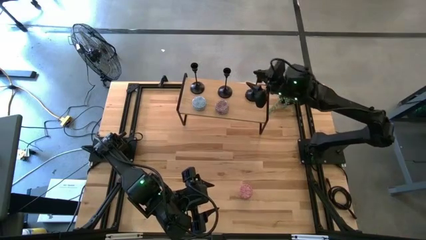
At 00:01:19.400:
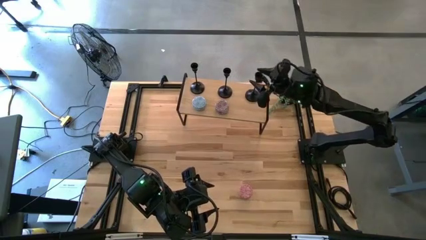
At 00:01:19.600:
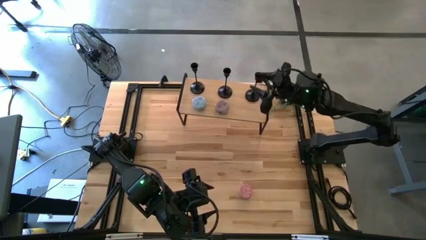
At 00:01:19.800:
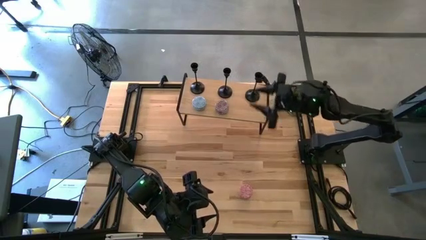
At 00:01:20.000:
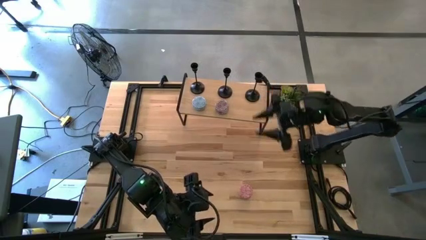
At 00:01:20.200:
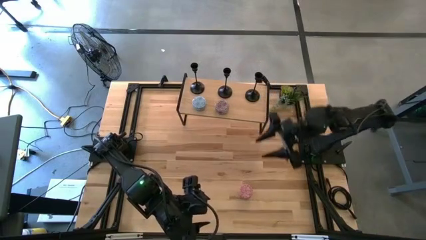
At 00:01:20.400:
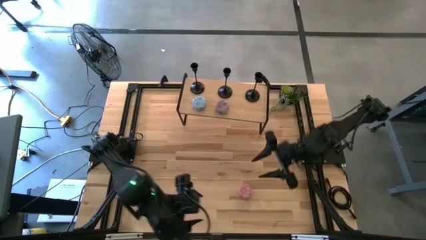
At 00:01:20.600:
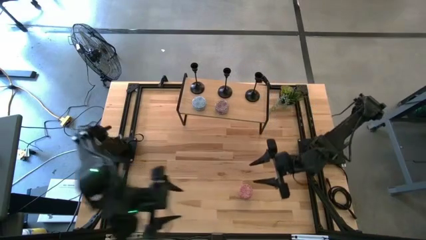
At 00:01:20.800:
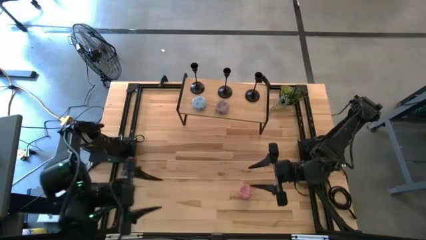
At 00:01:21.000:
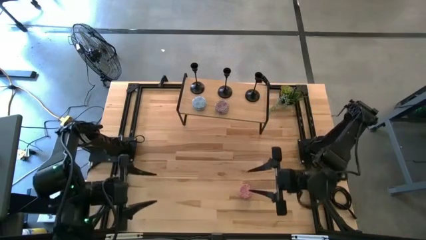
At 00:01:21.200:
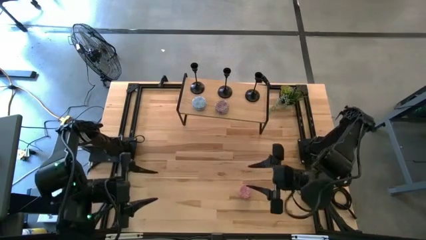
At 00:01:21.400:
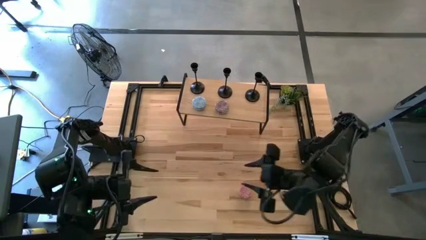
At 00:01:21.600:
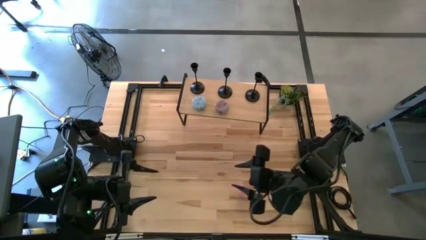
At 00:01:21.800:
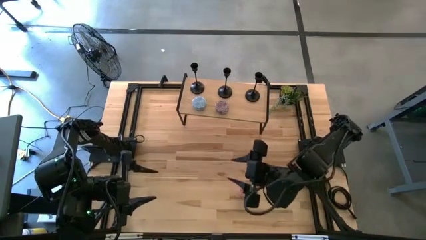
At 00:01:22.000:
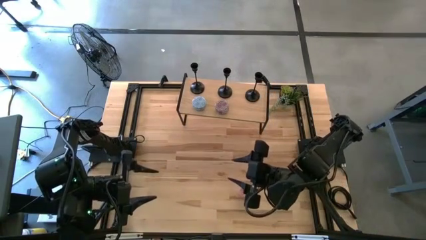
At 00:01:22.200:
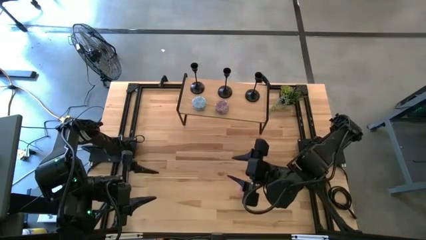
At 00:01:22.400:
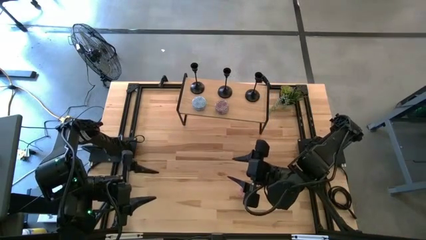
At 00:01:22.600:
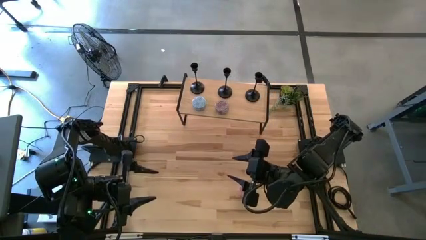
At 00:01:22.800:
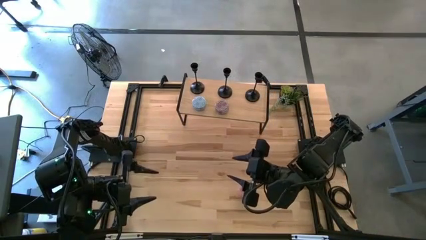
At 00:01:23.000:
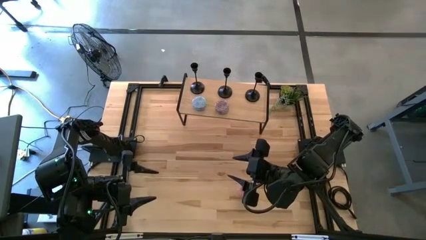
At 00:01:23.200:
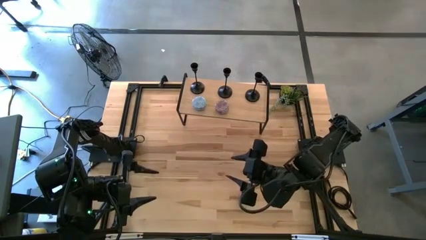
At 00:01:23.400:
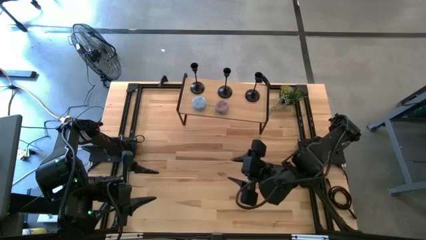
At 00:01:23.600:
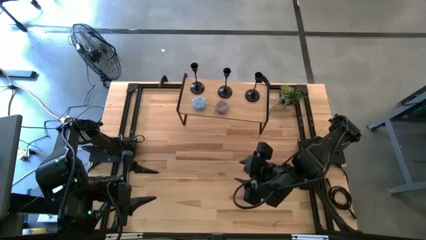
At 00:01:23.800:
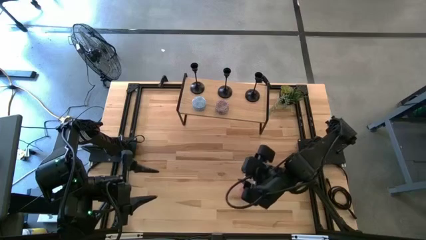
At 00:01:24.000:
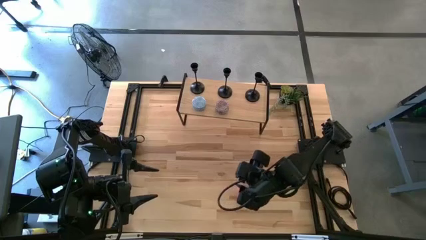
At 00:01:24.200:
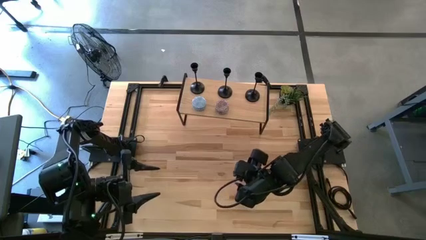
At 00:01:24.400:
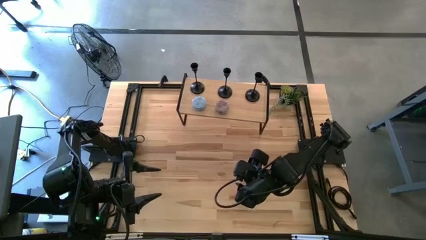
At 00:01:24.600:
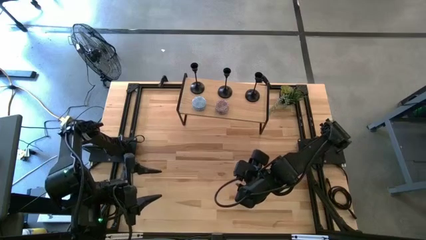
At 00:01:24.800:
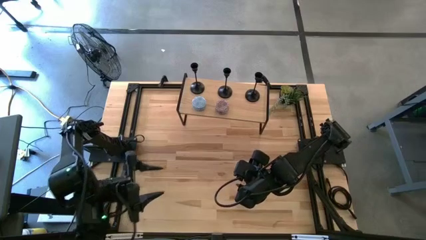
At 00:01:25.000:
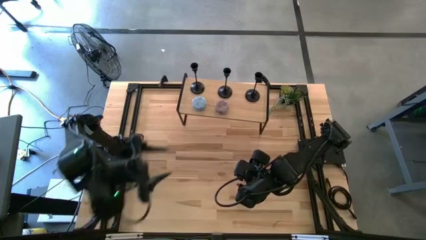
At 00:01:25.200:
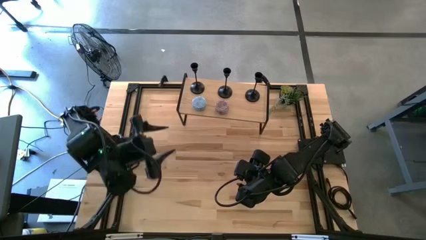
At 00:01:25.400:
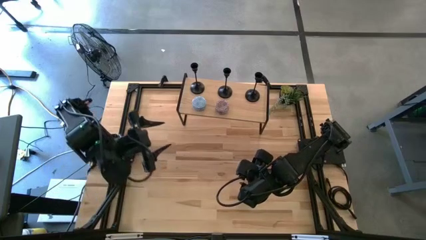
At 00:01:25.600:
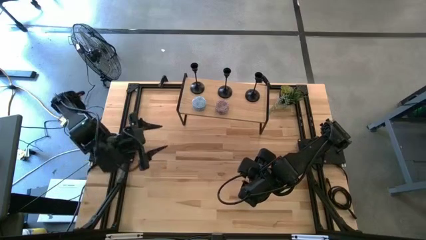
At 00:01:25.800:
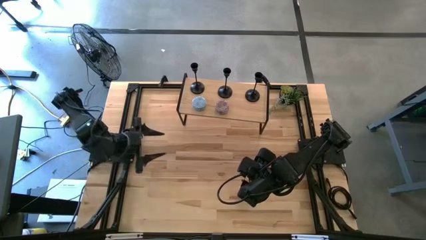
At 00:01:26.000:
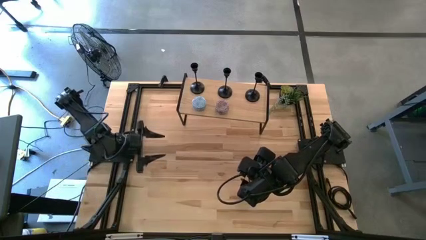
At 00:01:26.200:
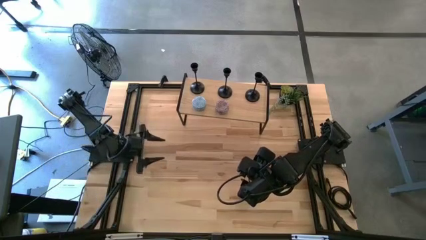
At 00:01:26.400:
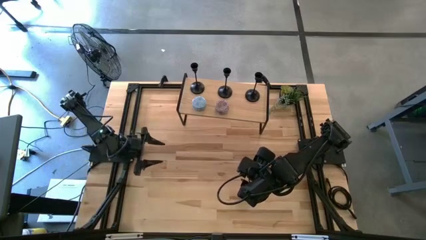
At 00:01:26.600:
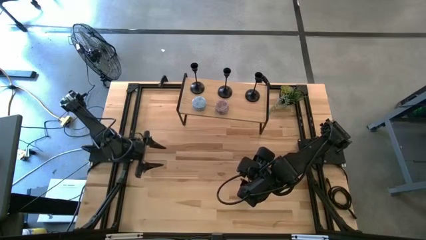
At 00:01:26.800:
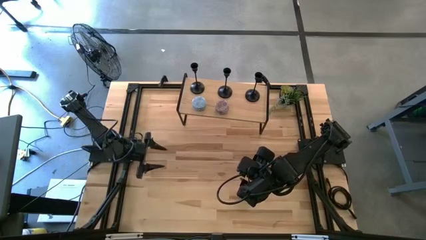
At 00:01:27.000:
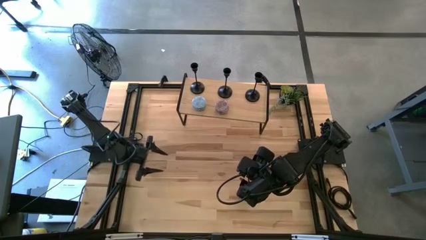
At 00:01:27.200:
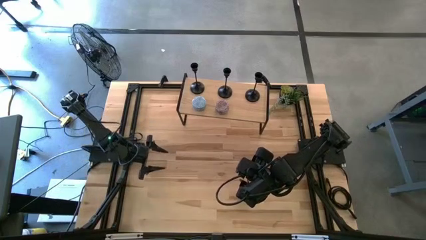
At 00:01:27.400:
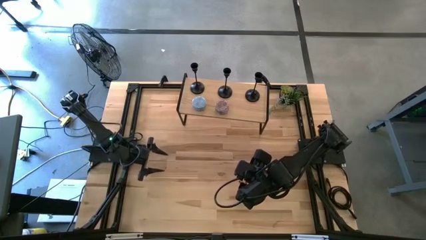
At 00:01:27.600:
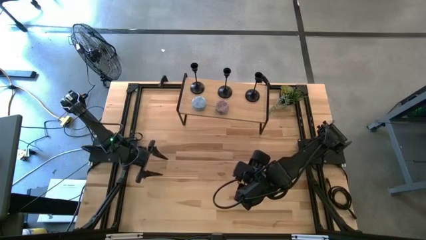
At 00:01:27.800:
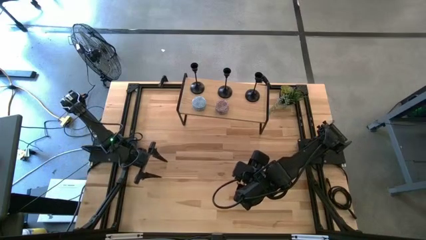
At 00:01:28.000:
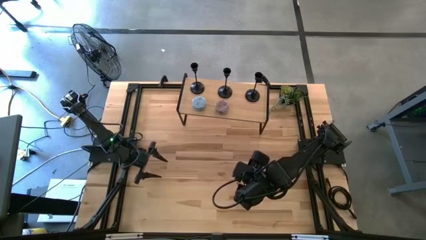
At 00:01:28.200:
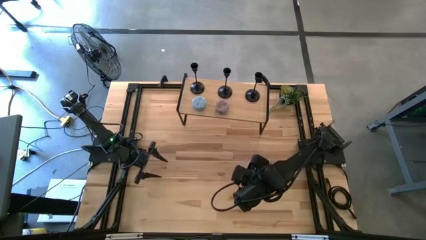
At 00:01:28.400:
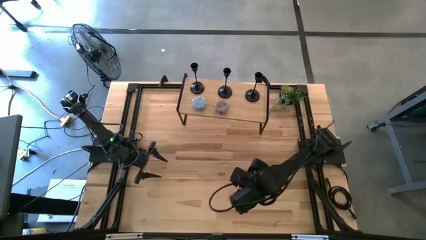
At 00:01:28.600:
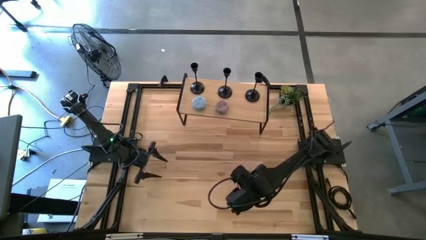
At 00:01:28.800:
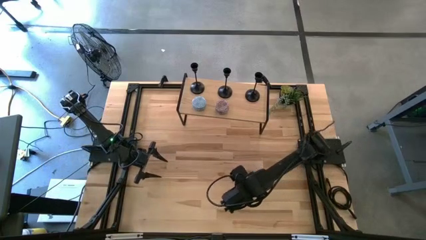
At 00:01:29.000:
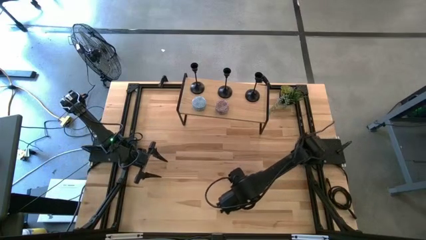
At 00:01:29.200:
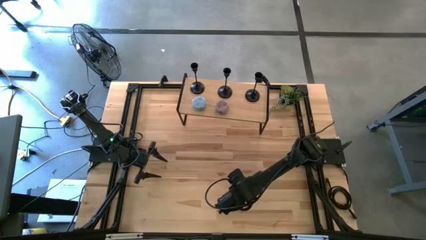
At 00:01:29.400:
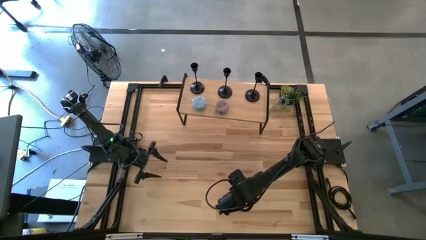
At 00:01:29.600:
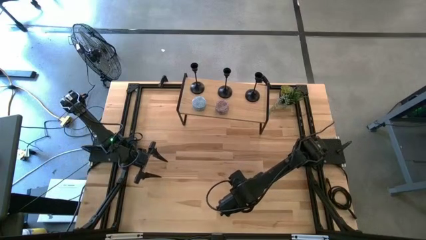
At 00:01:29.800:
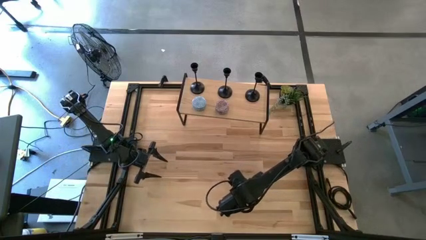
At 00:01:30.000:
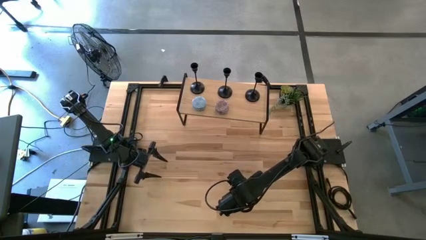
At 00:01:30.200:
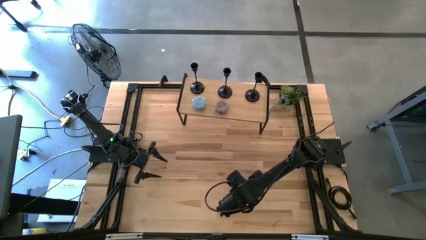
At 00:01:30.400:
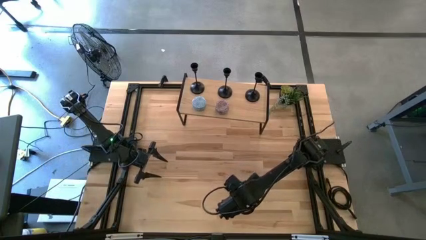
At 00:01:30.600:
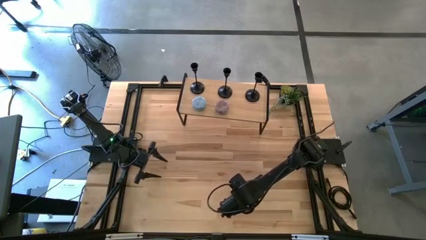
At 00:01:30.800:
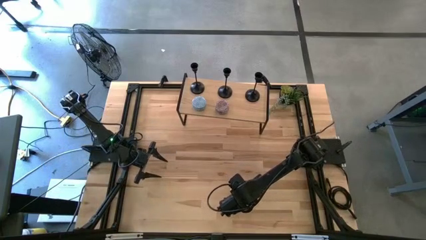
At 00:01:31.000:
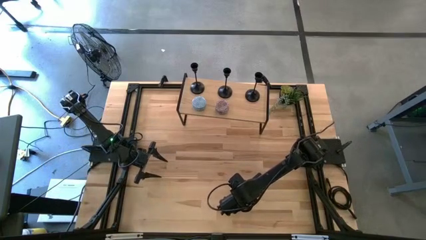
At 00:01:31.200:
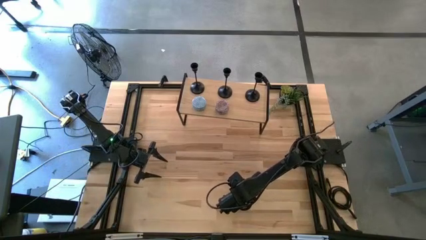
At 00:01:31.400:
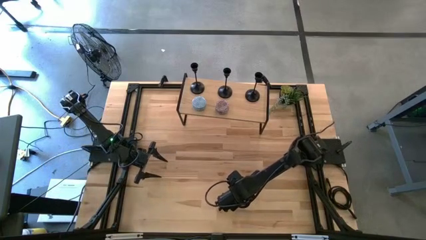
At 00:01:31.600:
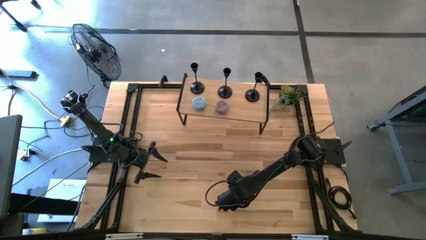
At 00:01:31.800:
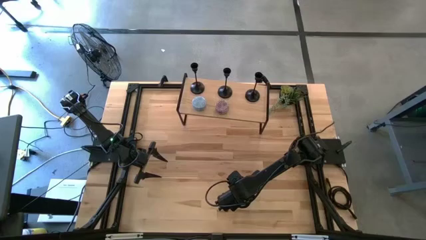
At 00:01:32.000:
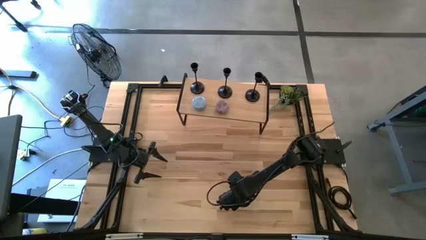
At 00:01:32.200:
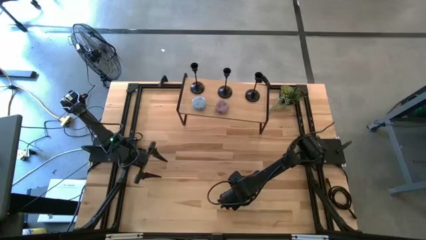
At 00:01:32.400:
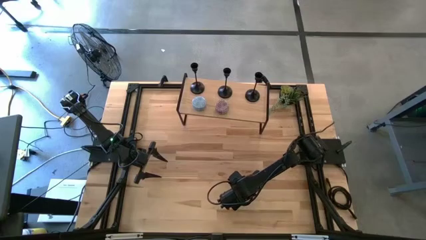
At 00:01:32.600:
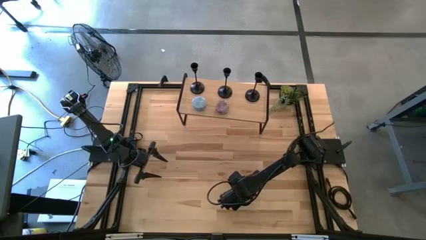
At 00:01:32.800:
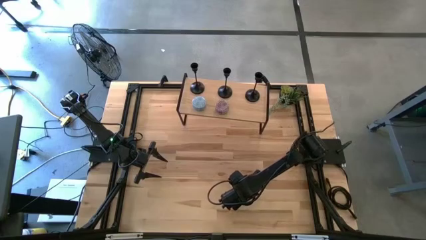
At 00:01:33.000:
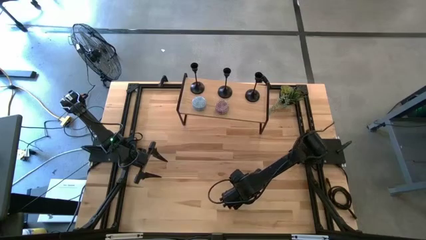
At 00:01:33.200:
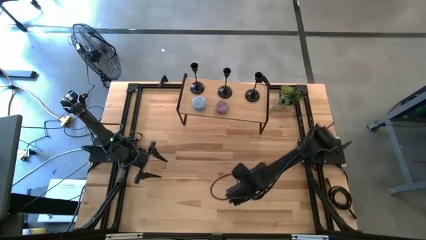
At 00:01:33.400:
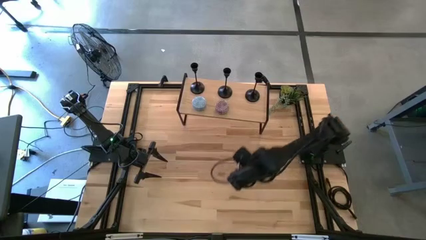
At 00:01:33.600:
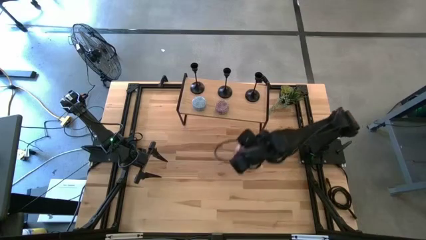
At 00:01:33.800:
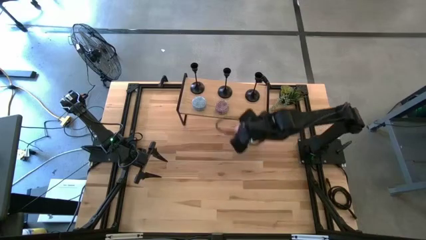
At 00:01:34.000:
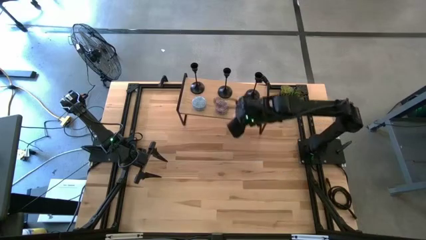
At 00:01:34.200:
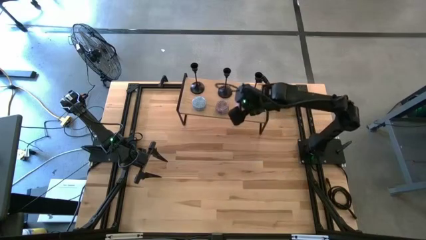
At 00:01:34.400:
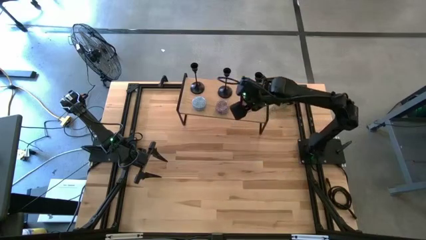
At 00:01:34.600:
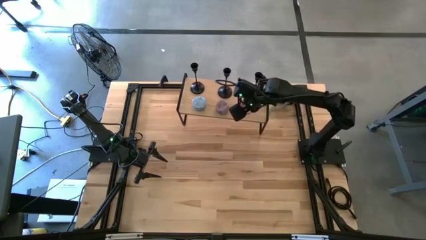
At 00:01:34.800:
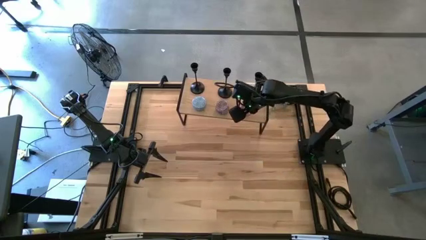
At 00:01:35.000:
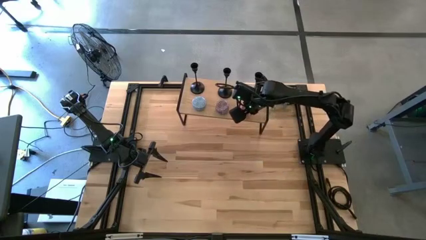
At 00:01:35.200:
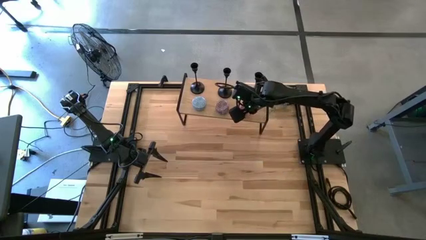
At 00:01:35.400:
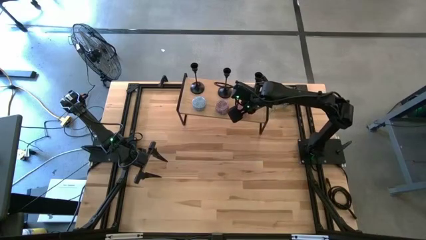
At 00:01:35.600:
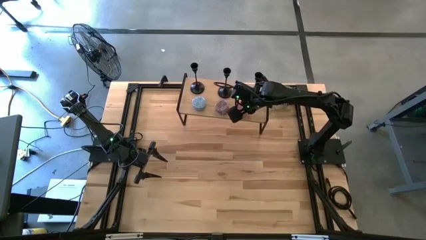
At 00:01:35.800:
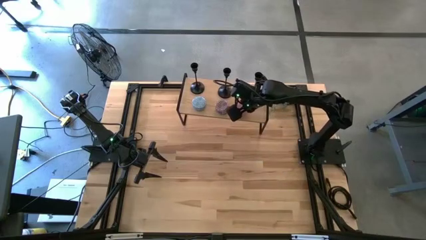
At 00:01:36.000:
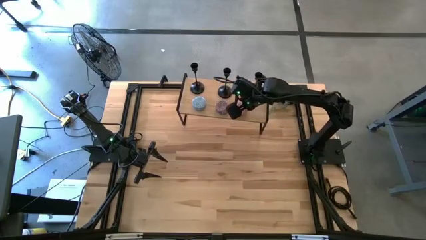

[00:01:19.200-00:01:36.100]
Task: Pick & Place candle stick holders
Put the pink scented candle on the shelf
